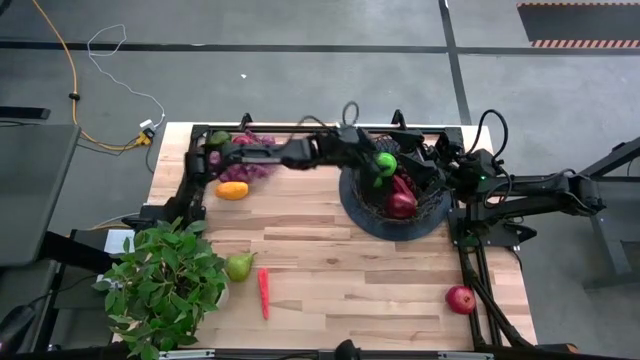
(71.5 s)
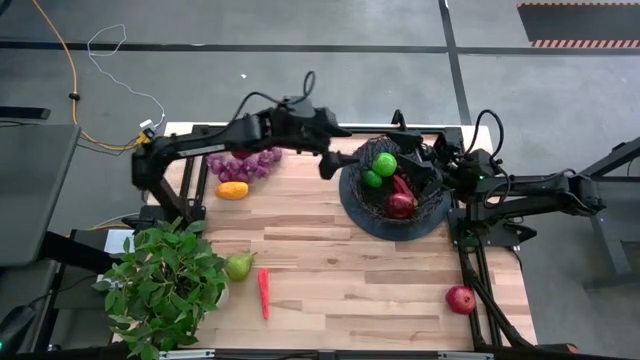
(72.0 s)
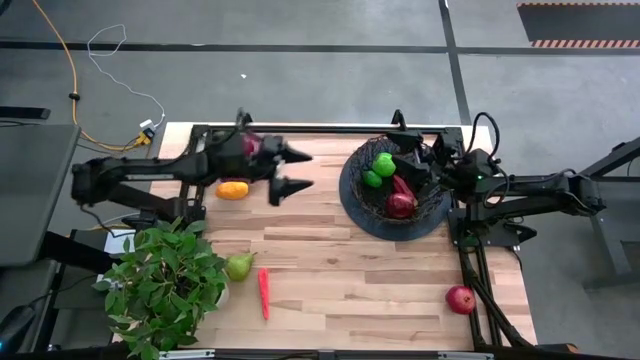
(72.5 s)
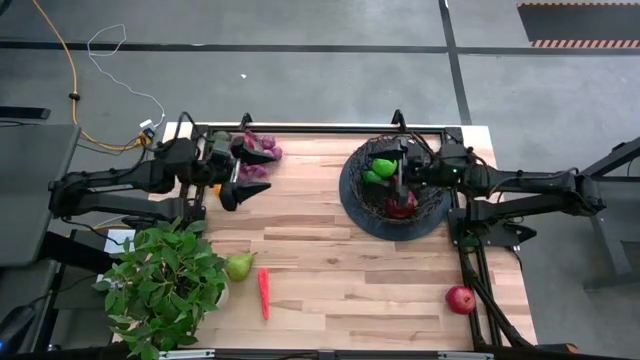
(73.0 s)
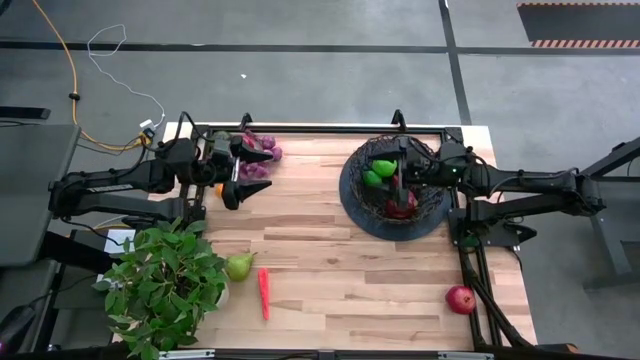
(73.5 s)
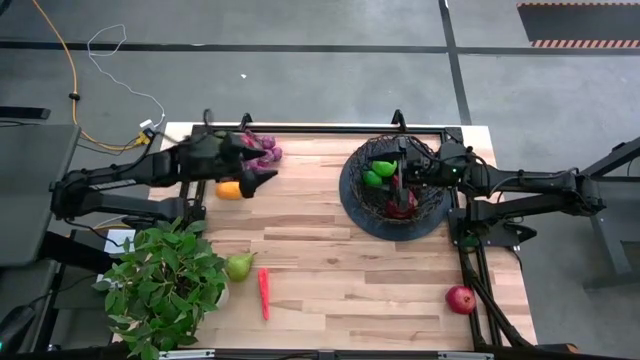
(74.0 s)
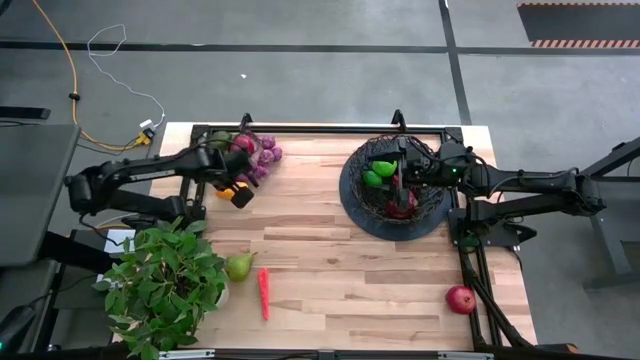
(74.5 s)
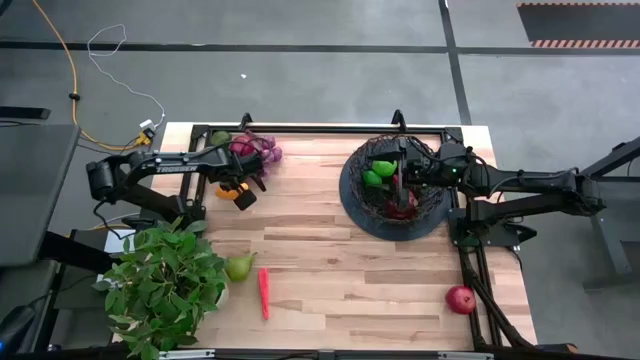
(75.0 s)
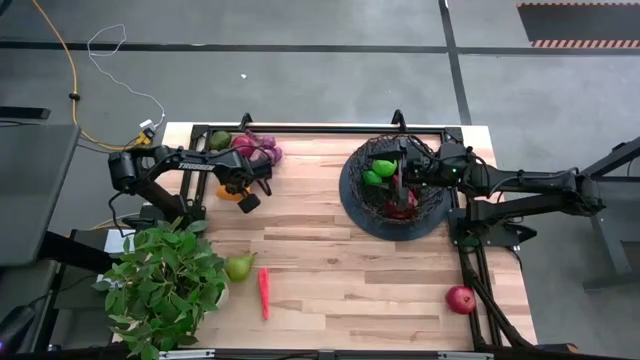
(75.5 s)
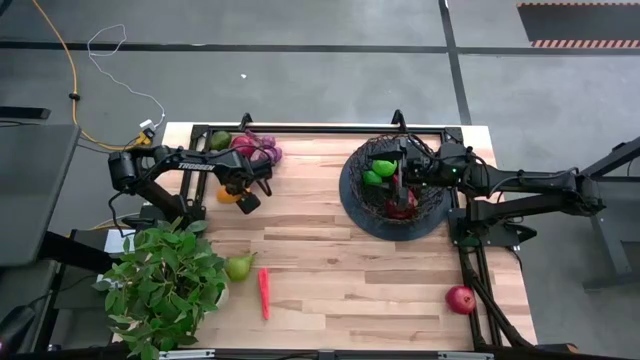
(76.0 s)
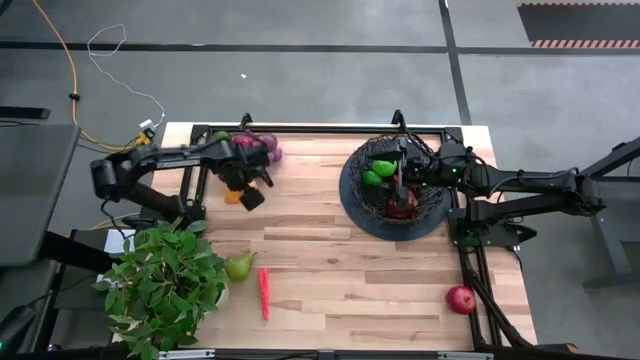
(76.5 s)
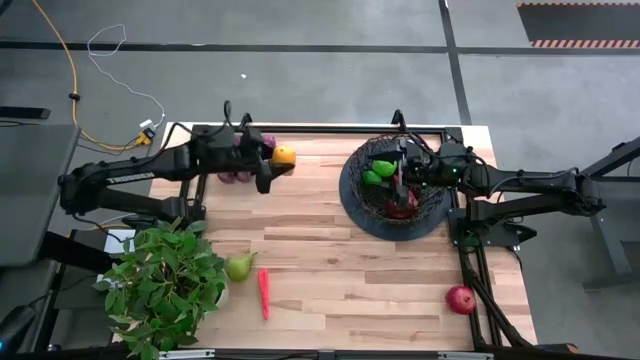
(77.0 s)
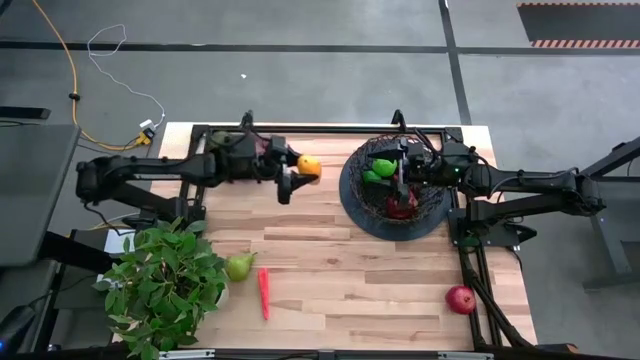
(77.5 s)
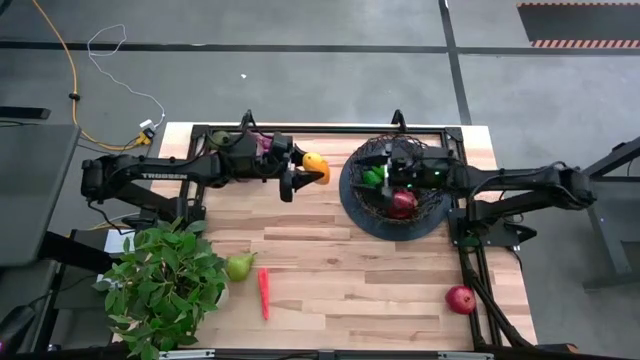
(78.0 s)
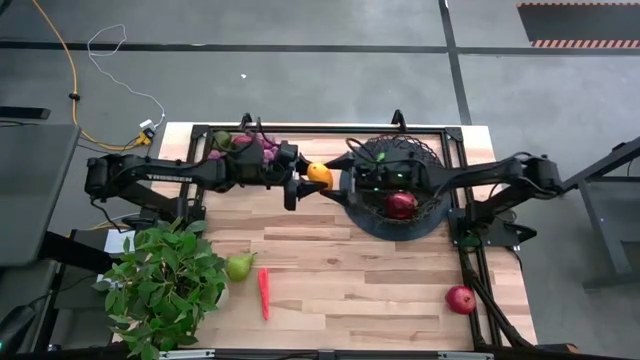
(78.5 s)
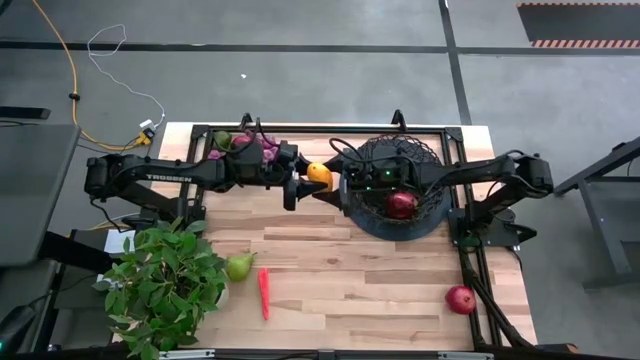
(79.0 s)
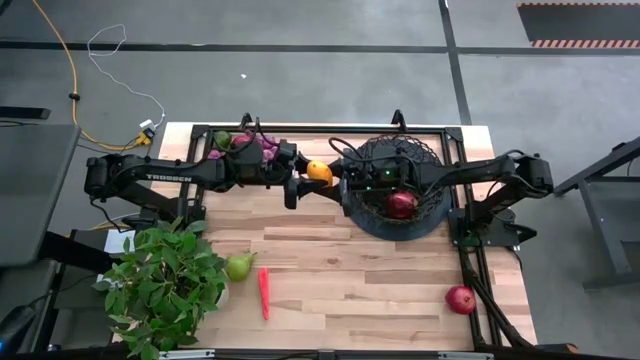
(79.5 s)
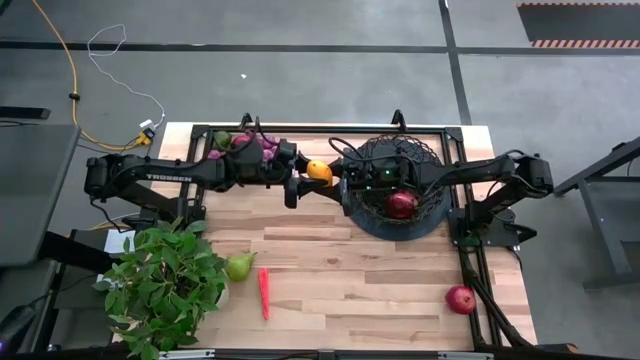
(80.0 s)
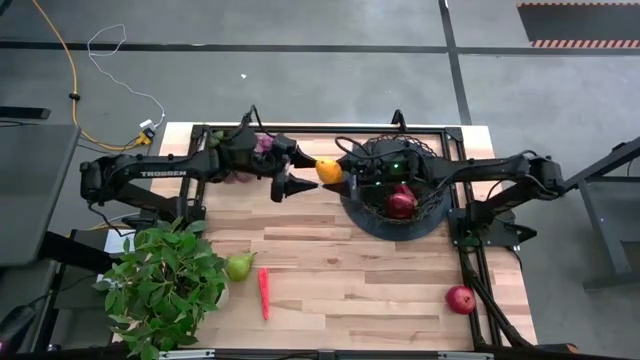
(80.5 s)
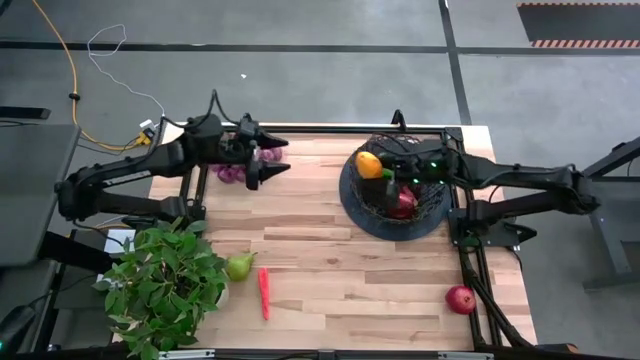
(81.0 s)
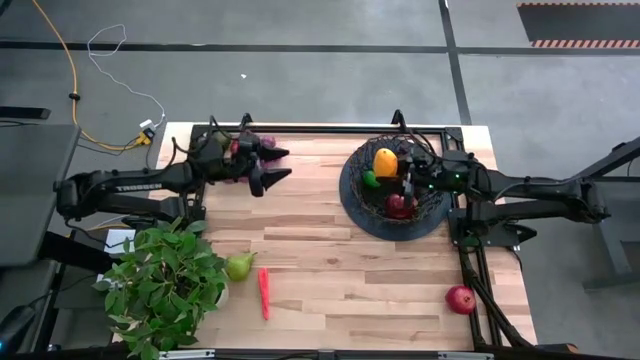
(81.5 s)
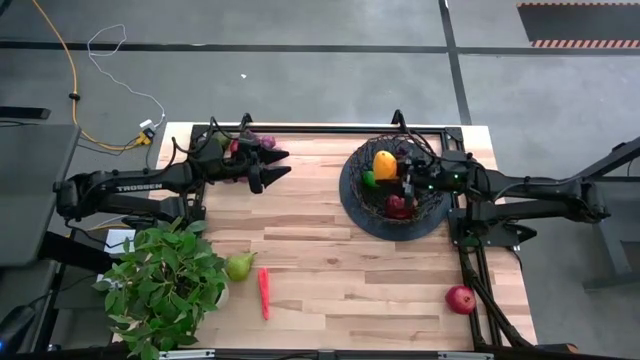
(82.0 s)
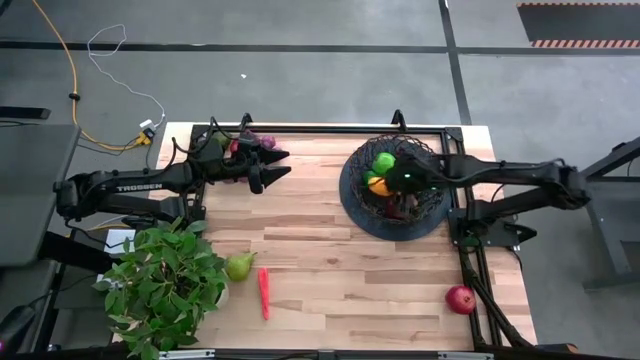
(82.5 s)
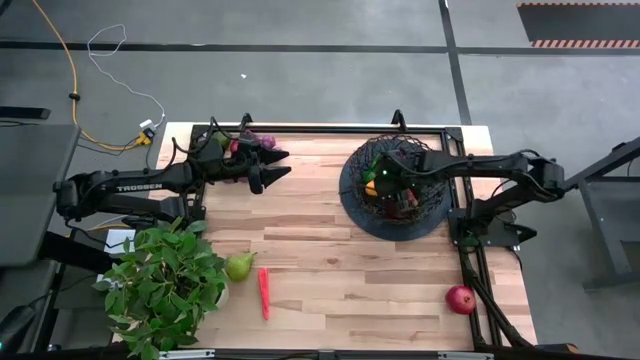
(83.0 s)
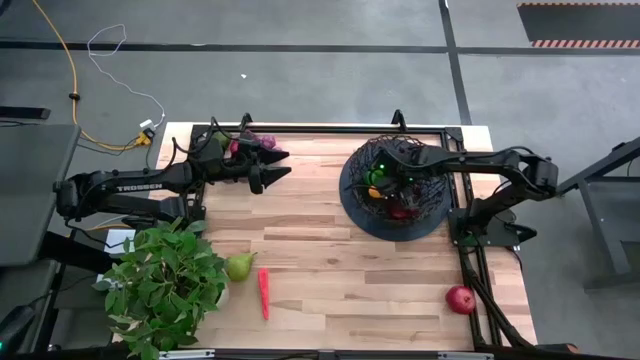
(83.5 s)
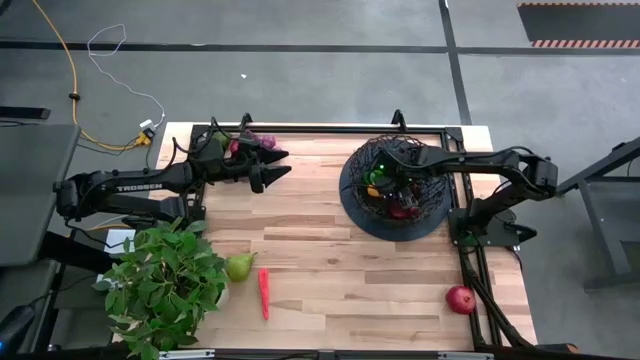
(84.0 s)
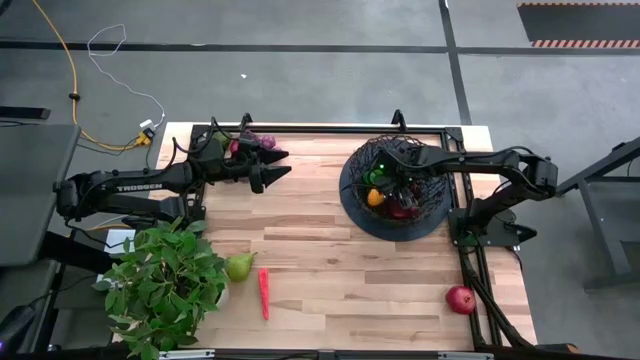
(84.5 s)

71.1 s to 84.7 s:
Task: Build produce basket
Put the yellow mango into the black wire basket

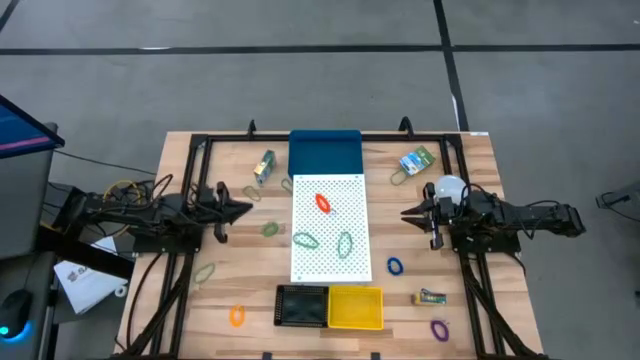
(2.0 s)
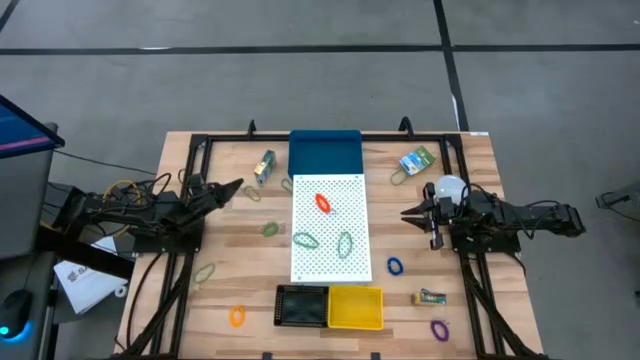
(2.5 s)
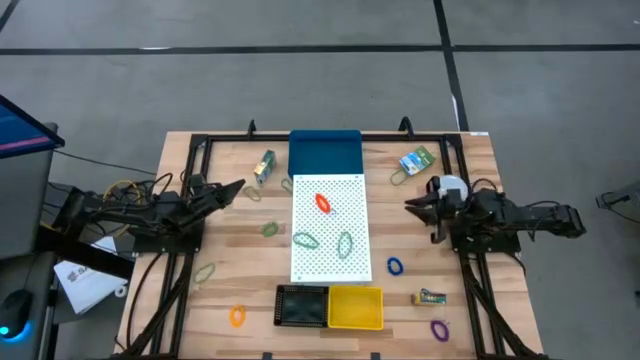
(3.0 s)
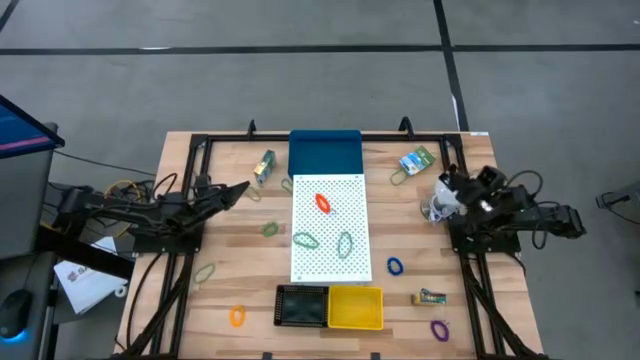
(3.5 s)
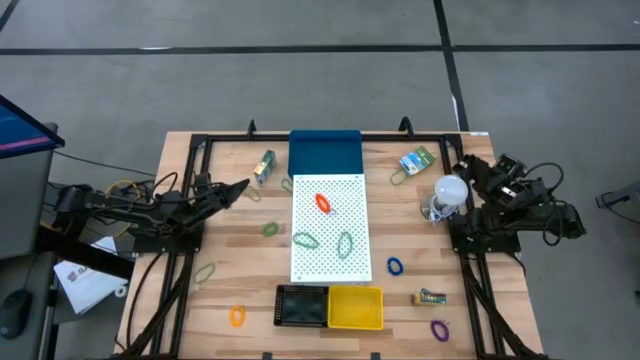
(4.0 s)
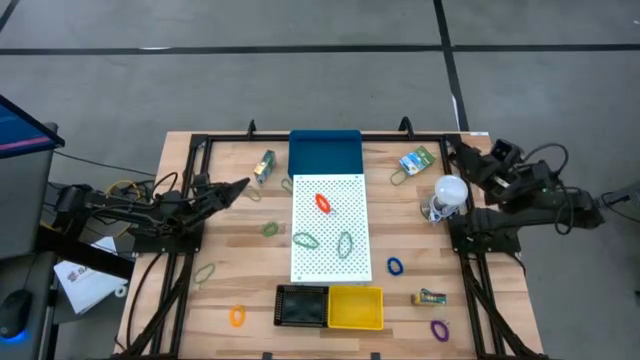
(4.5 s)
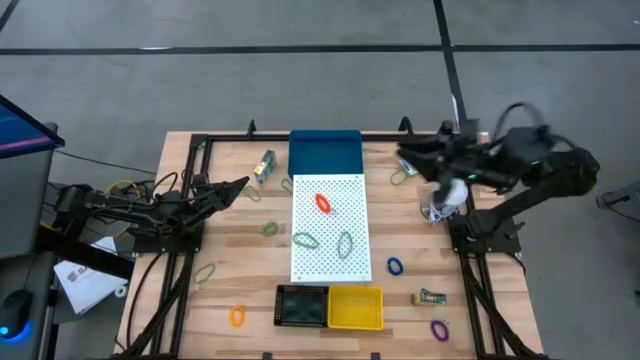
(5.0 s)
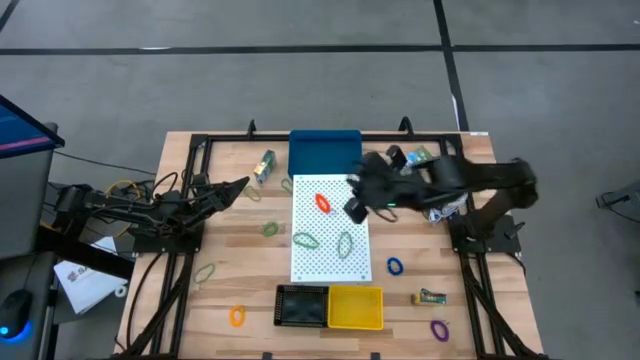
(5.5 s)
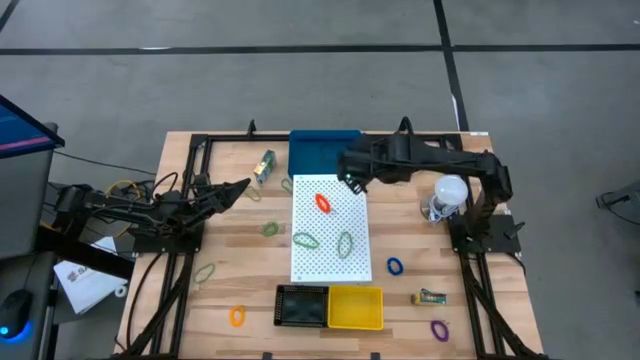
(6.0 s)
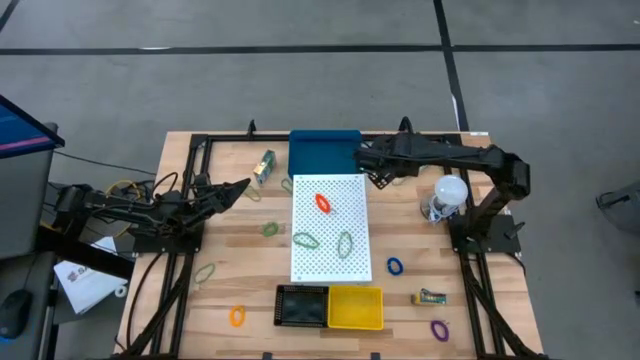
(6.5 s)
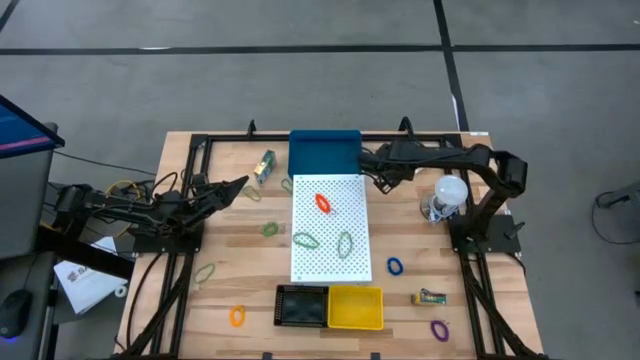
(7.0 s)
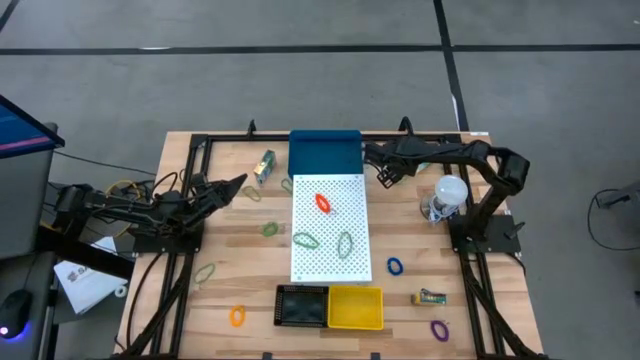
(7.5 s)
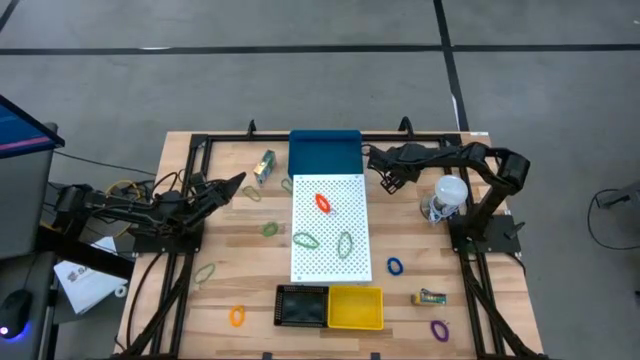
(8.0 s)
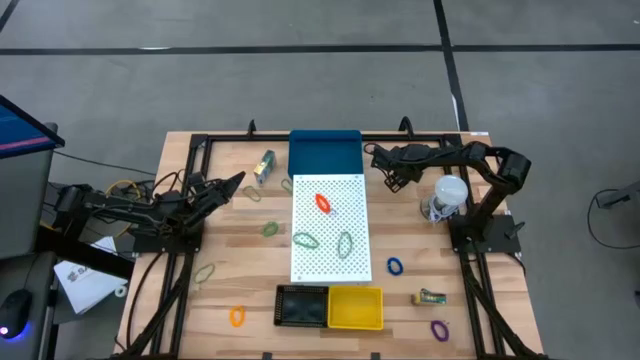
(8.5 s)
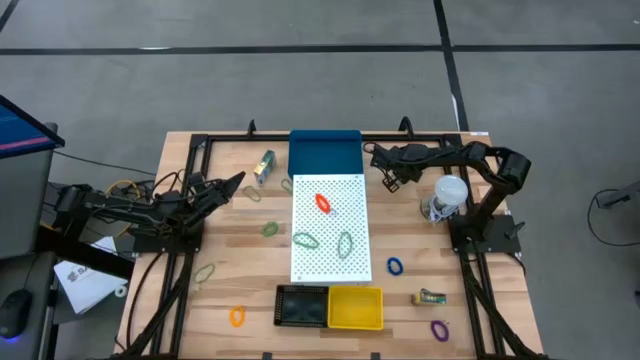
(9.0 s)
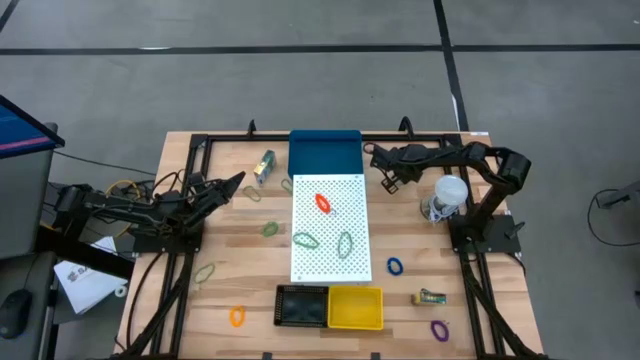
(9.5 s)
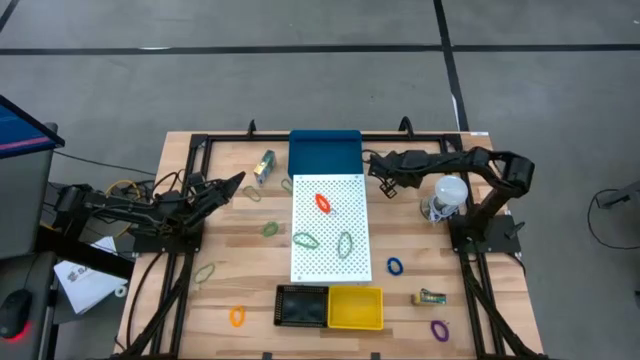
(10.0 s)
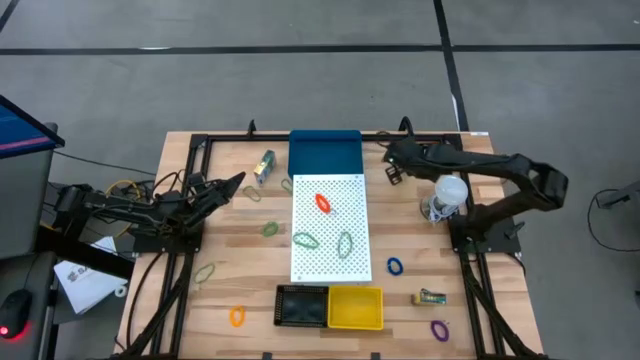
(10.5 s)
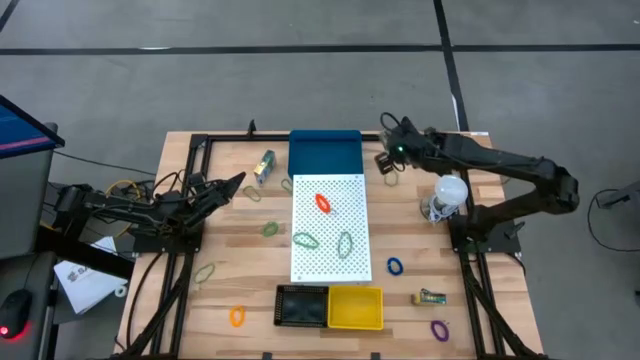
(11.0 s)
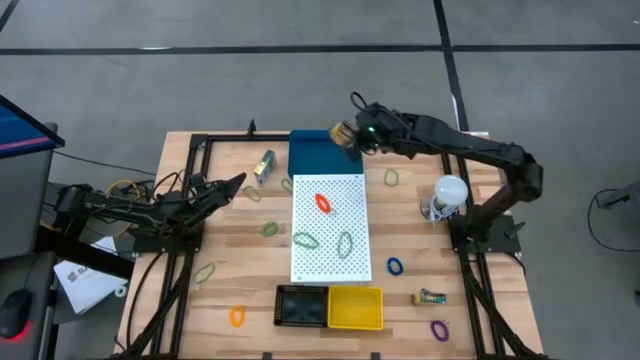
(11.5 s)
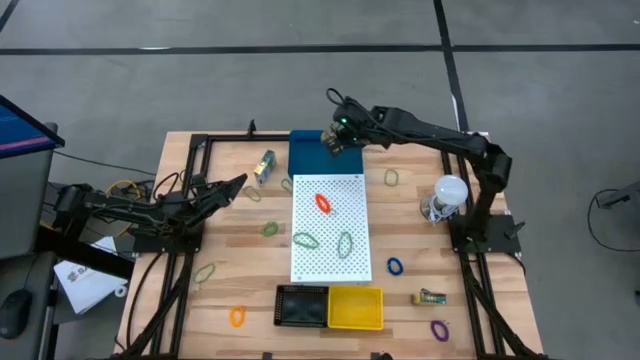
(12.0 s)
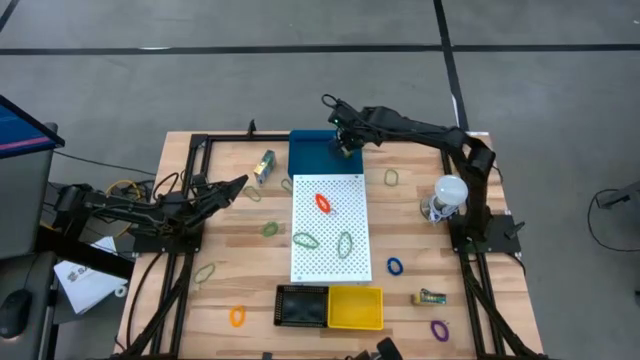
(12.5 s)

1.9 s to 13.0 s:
Task: Pick & Place Office Desk Supplies
Put the crayon box into the blue bin
